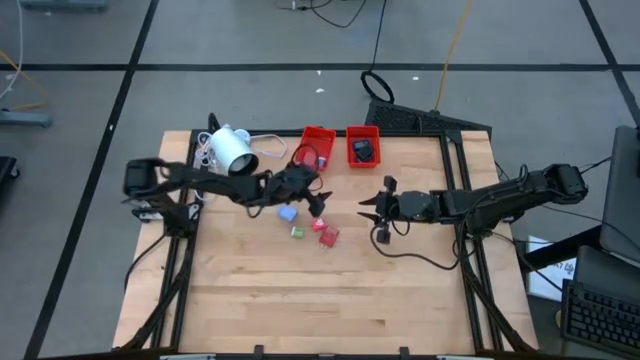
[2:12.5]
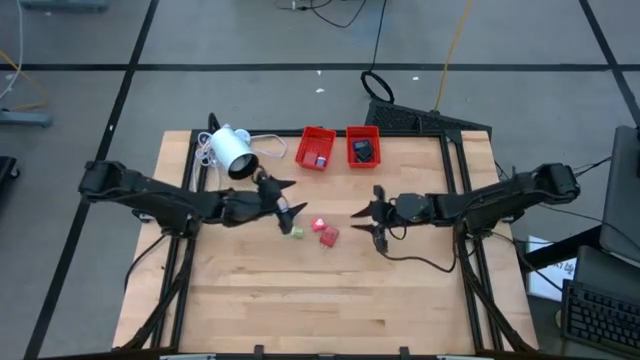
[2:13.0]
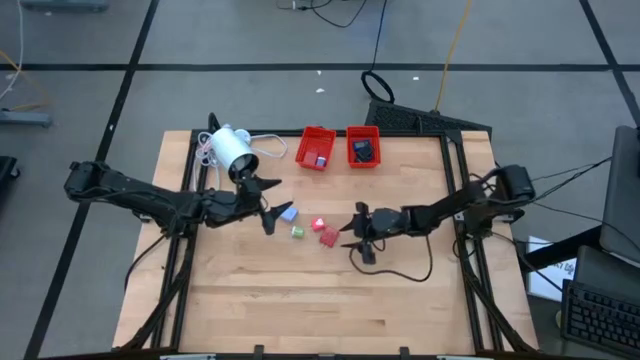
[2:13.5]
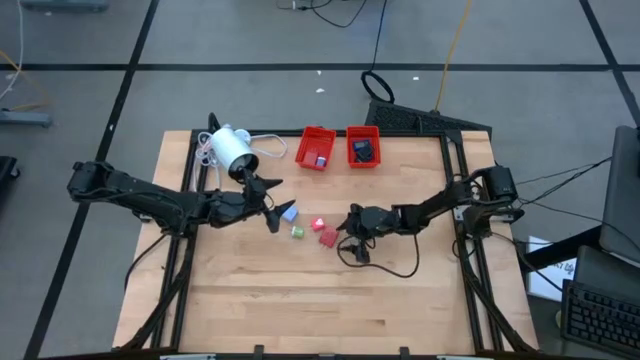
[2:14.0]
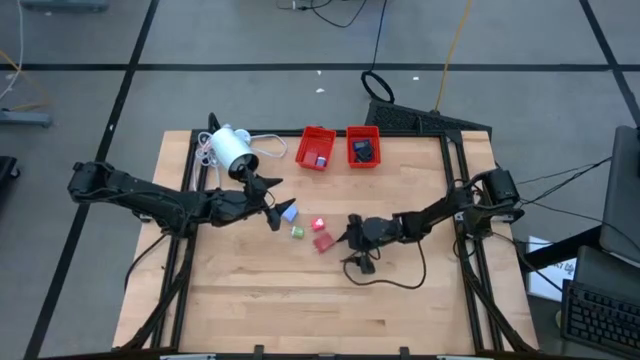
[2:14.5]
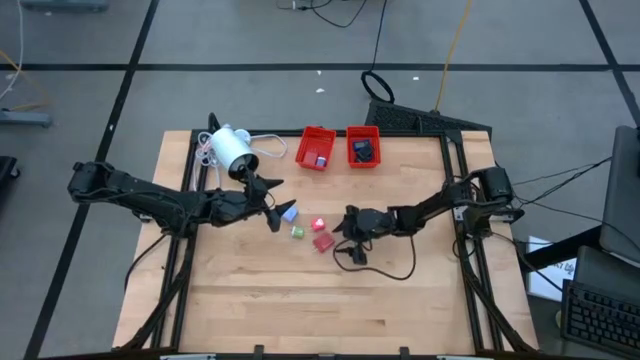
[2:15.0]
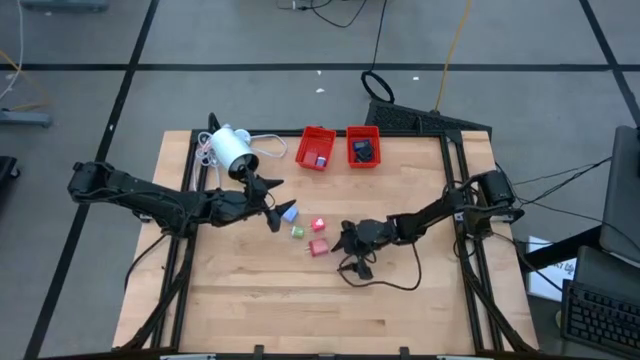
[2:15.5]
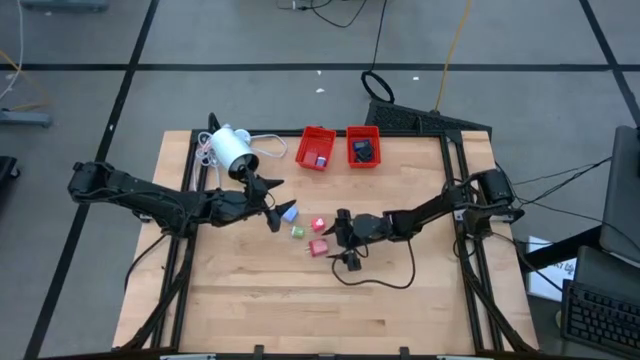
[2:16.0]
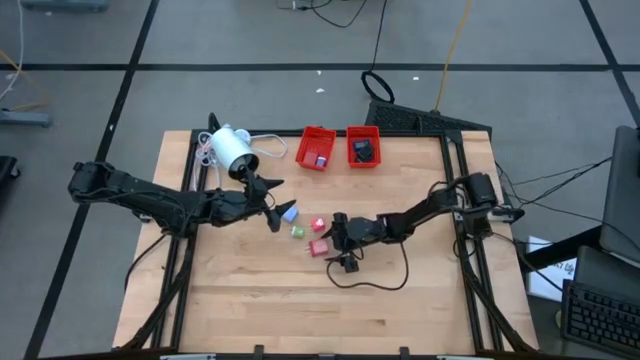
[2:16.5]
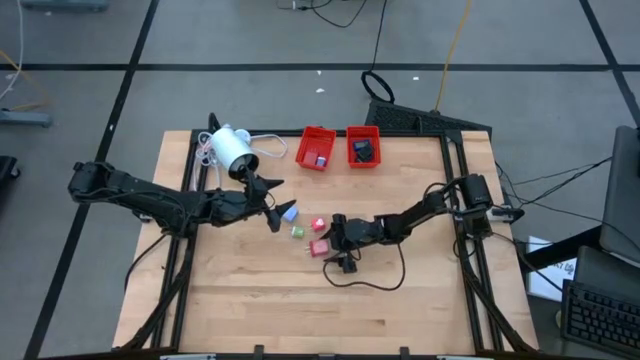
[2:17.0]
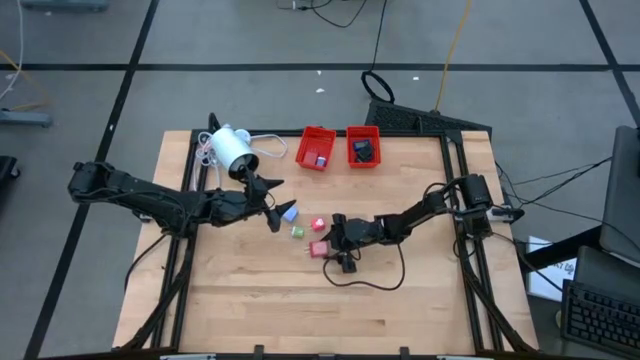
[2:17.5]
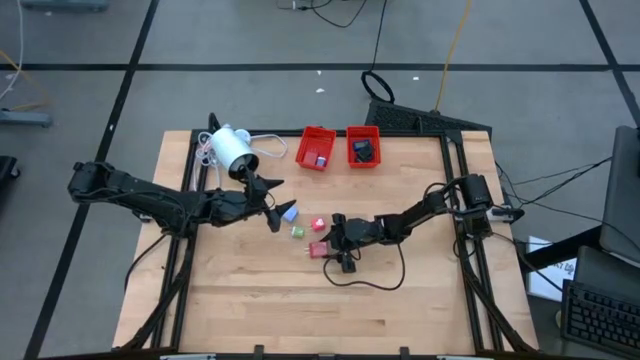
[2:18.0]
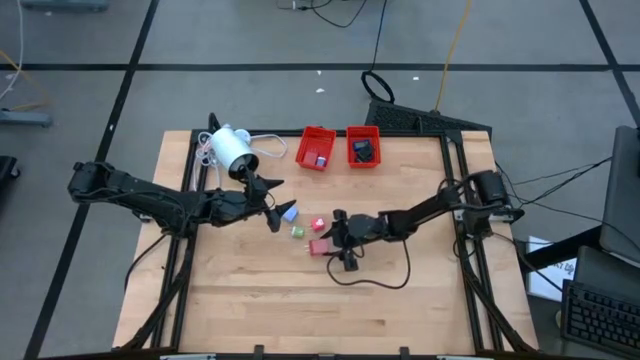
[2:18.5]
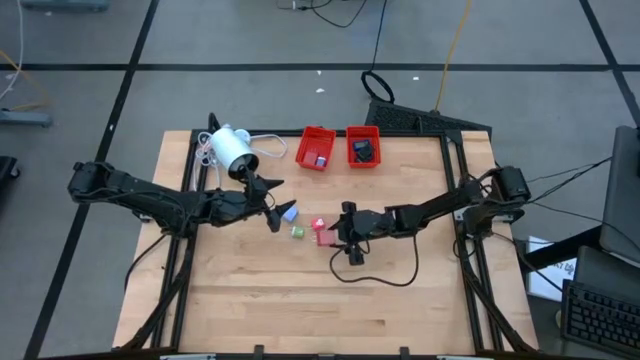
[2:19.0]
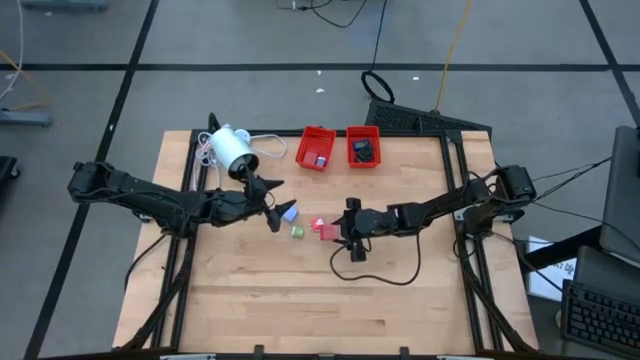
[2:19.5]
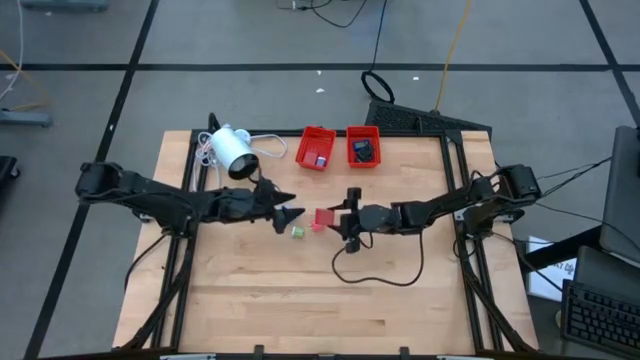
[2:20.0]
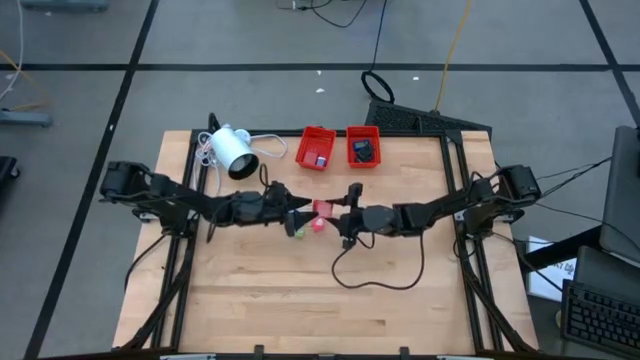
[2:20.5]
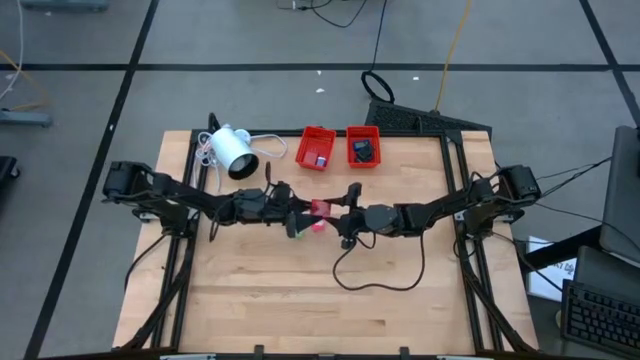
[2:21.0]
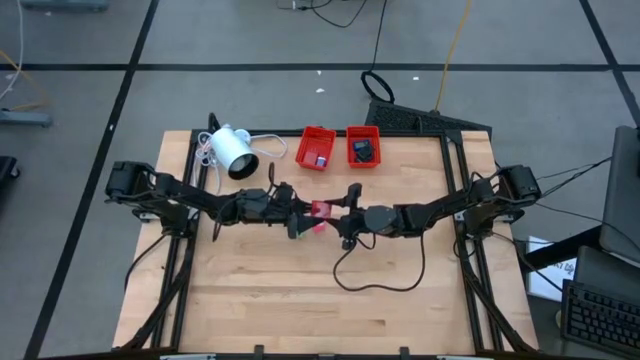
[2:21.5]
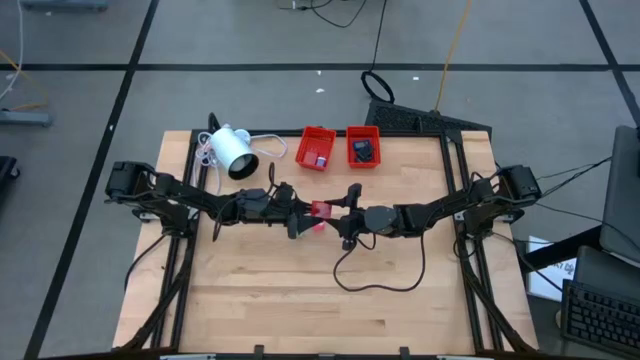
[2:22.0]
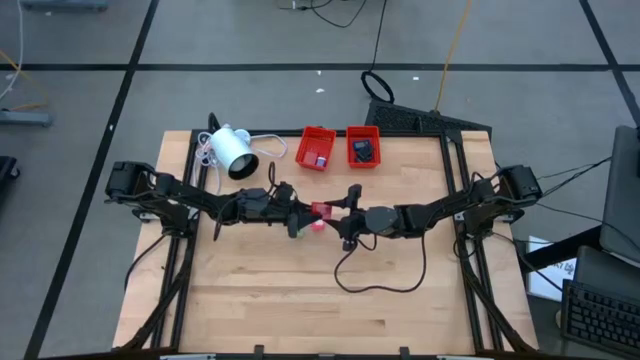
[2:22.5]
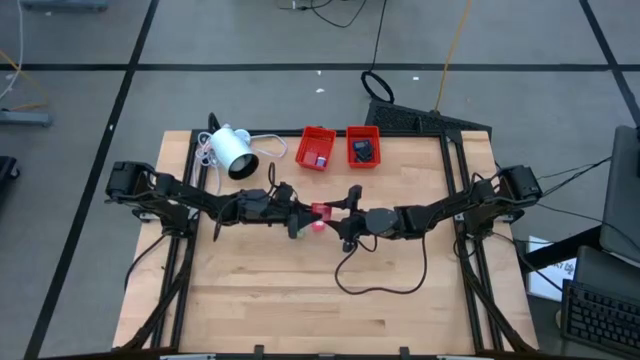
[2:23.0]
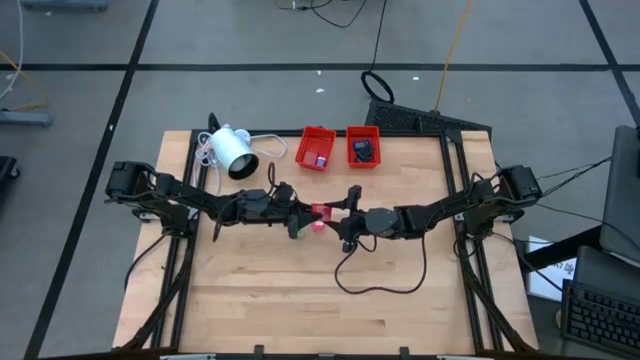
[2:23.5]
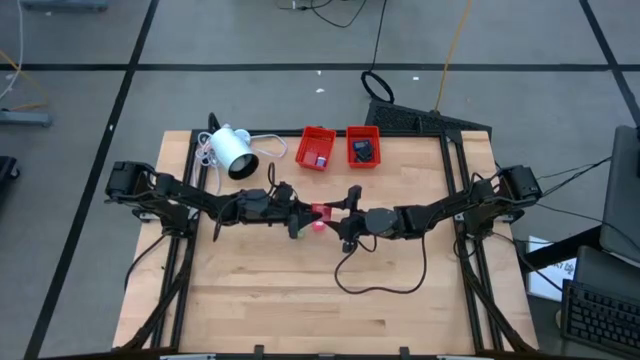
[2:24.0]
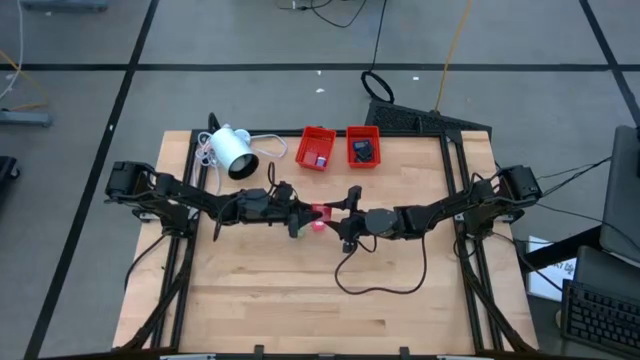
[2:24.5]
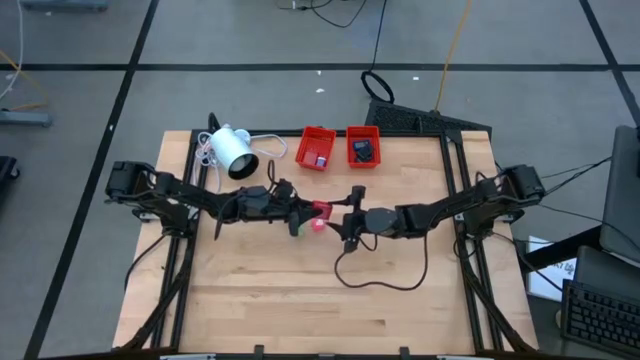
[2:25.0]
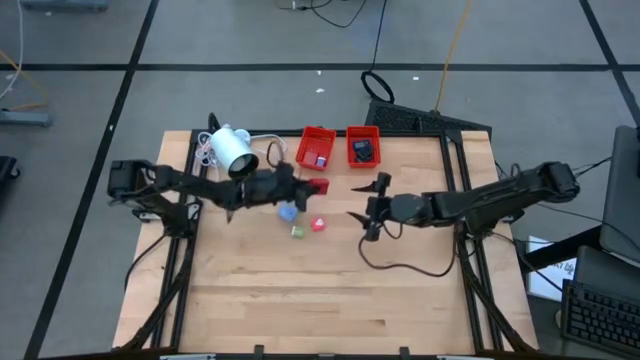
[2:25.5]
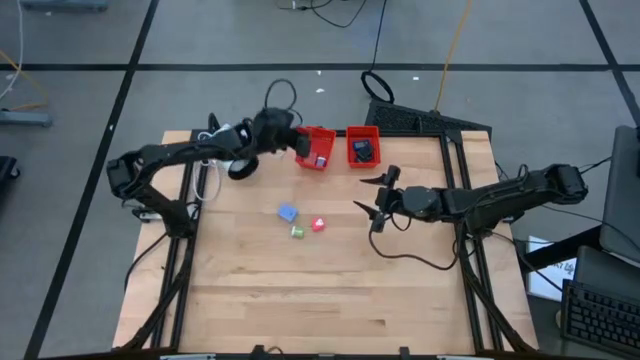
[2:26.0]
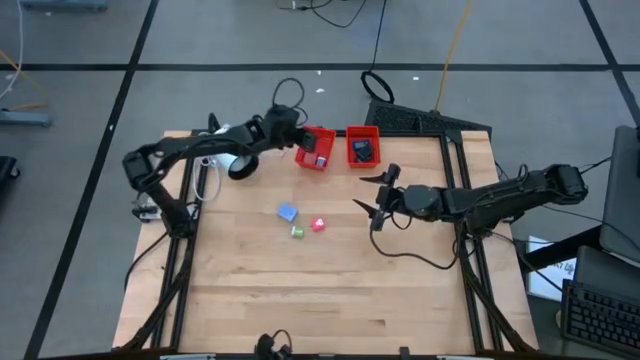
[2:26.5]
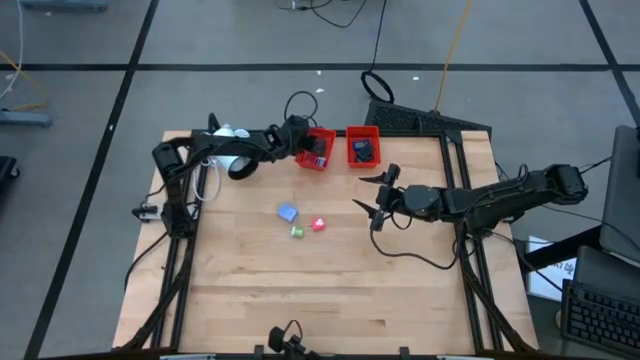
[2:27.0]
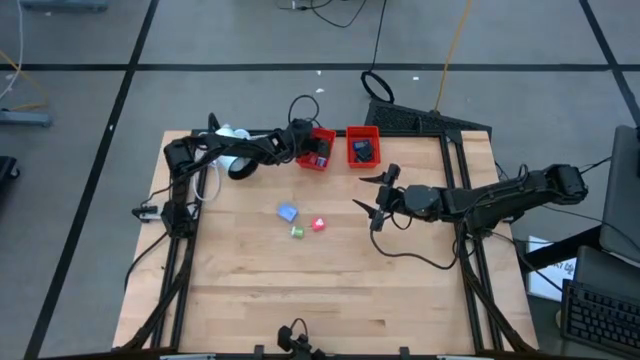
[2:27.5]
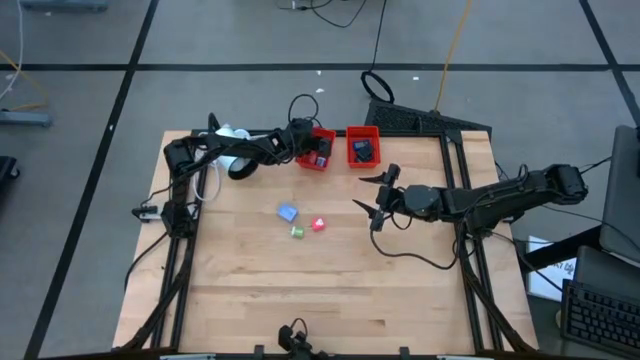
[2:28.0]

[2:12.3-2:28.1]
Task: Pick & Place Office items
Put the red charger adapter into the left red bin

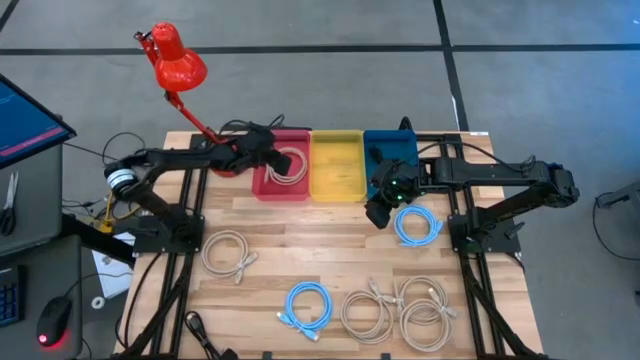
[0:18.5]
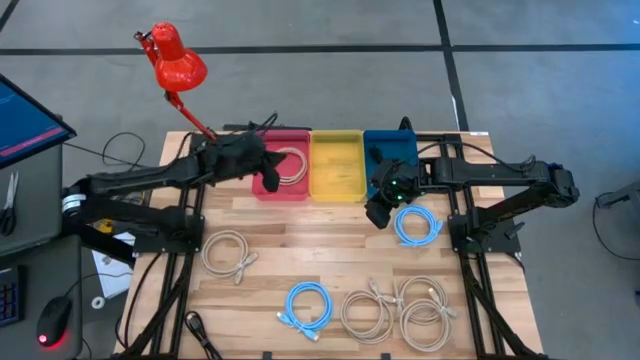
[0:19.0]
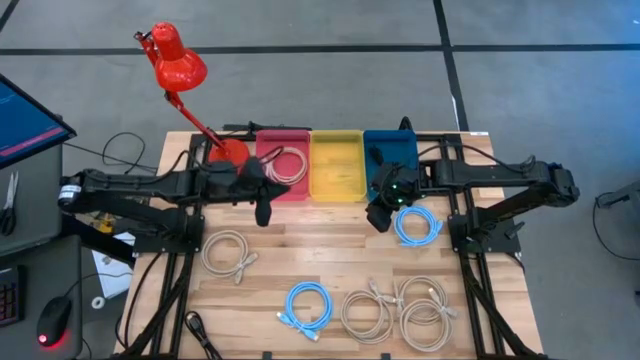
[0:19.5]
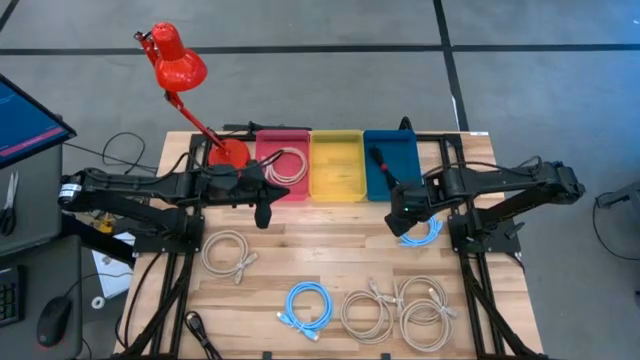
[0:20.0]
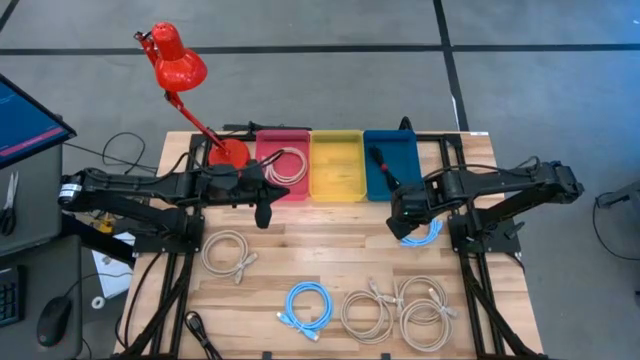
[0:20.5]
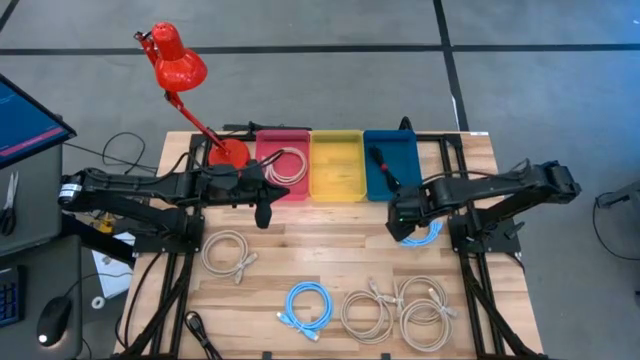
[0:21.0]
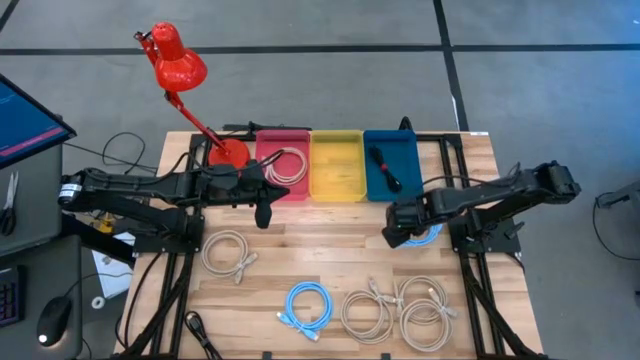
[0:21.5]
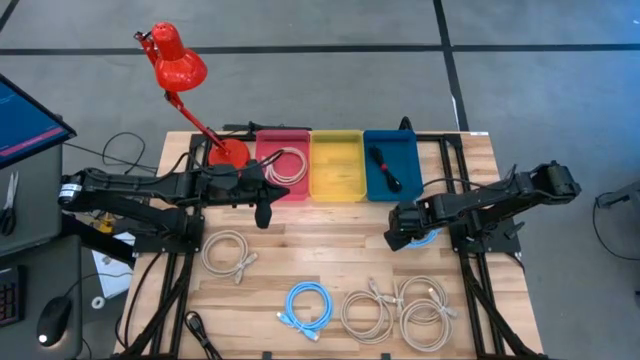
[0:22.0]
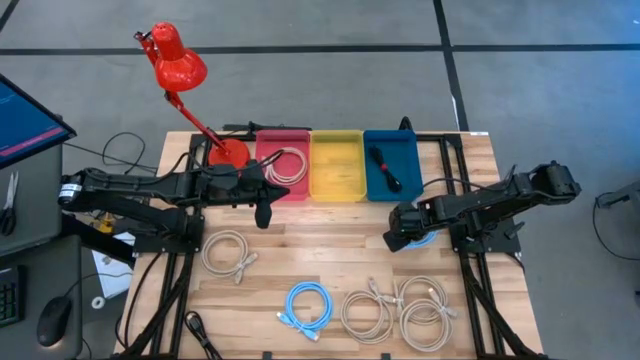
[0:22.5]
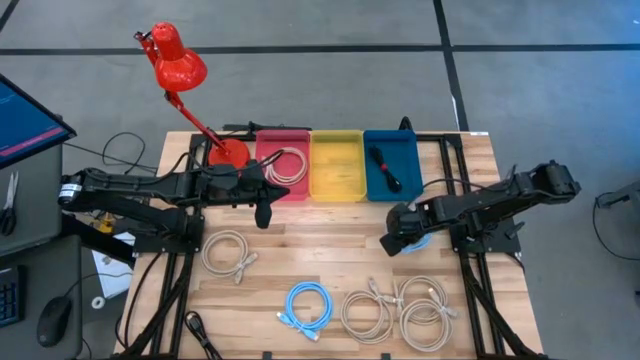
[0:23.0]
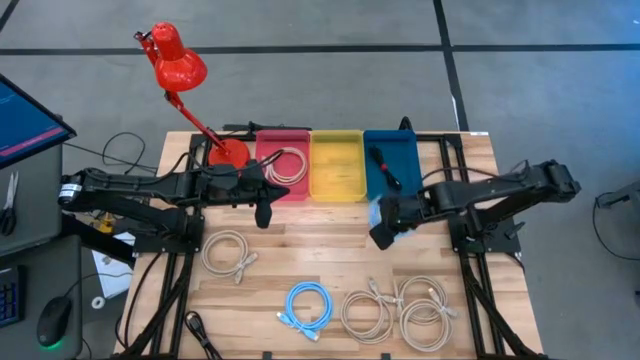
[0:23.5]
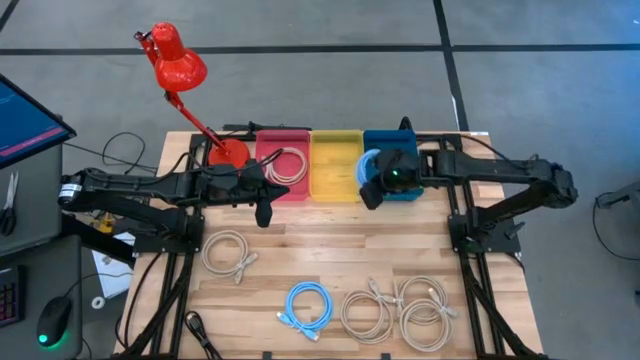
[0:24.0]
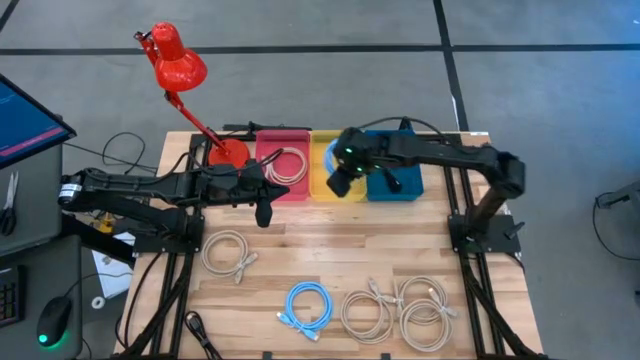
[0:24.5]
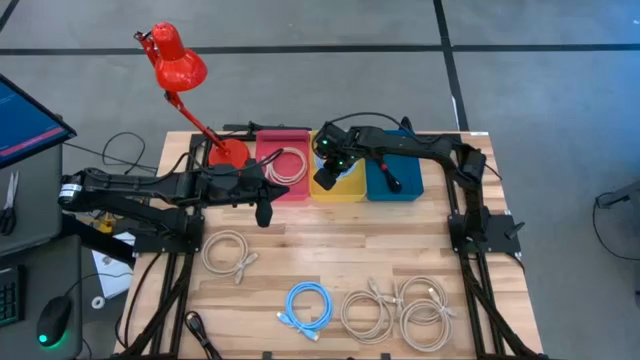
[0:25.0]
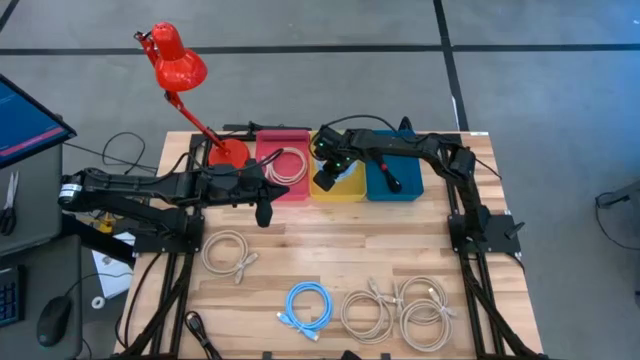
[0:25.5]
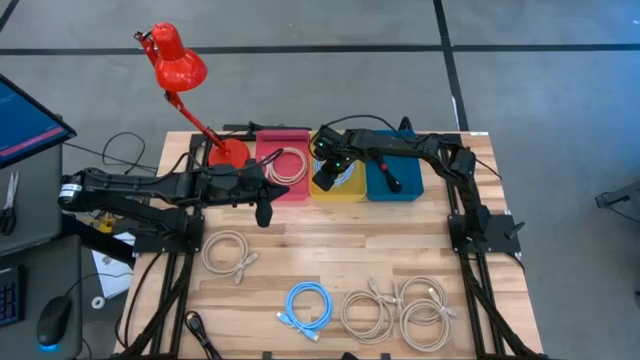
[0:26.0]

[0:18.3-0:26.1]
Task: Pick & Place USB Port
Put the top right blue charger cable into the yellow bin
